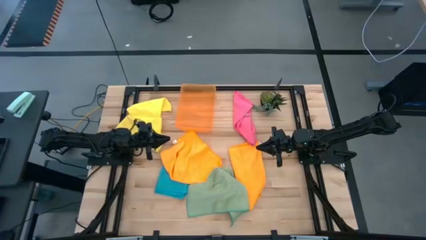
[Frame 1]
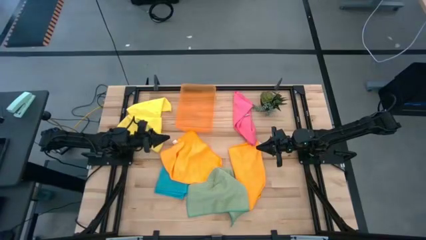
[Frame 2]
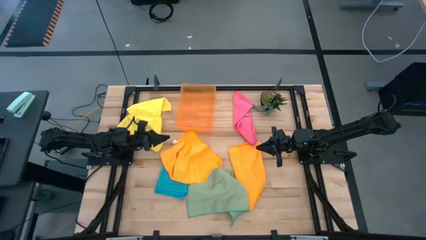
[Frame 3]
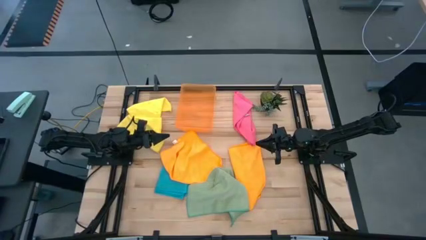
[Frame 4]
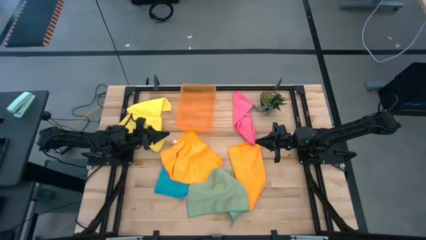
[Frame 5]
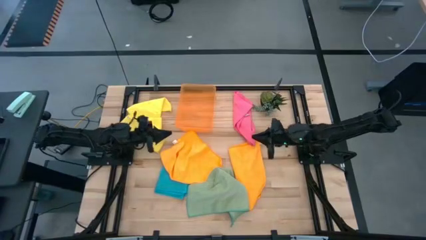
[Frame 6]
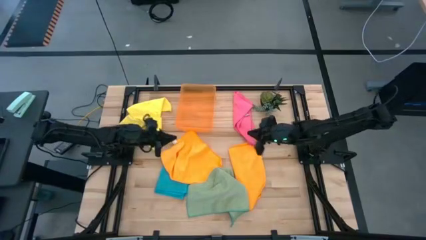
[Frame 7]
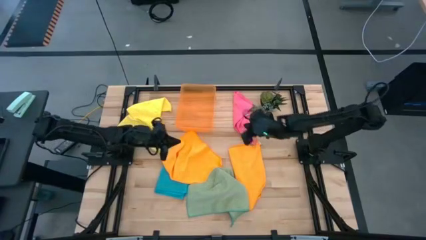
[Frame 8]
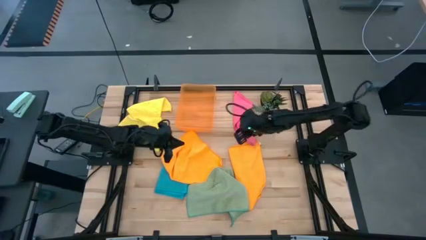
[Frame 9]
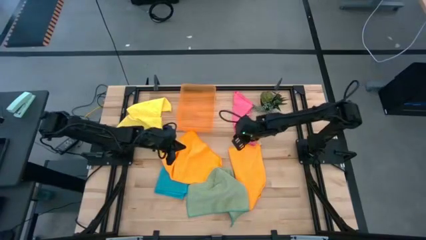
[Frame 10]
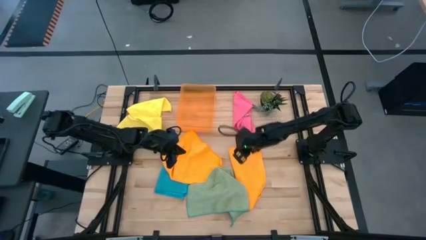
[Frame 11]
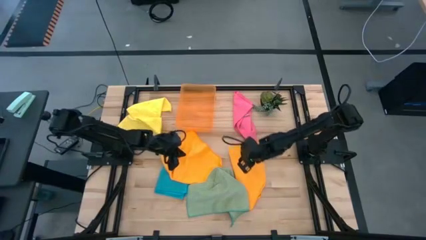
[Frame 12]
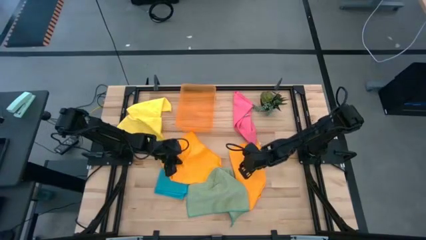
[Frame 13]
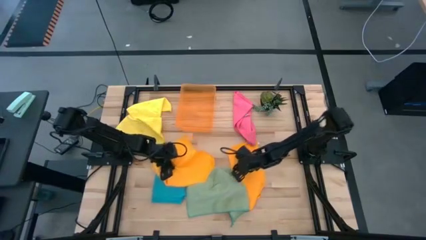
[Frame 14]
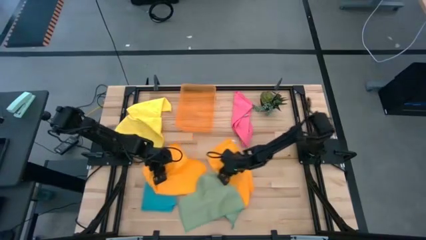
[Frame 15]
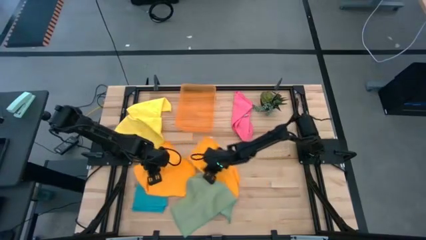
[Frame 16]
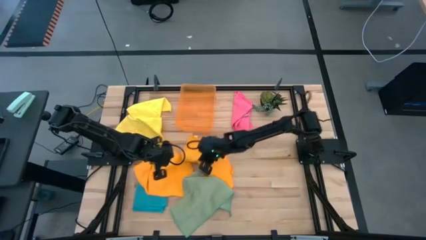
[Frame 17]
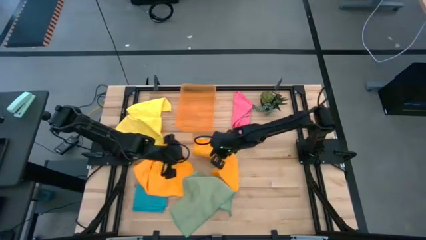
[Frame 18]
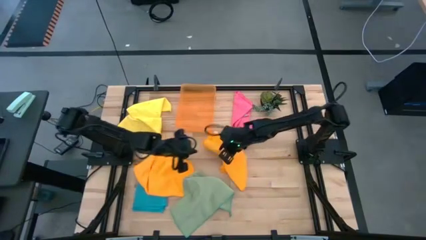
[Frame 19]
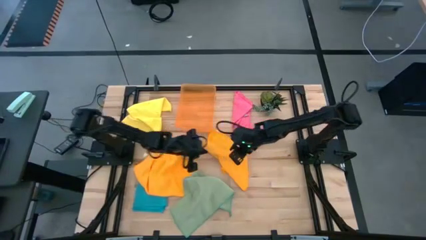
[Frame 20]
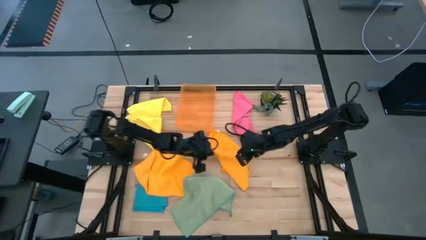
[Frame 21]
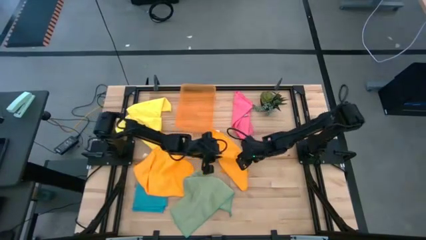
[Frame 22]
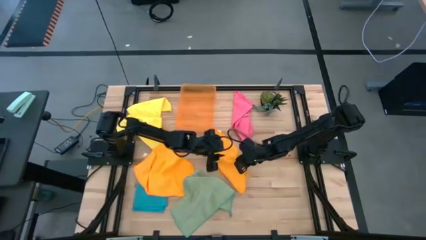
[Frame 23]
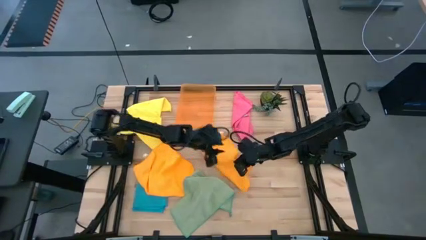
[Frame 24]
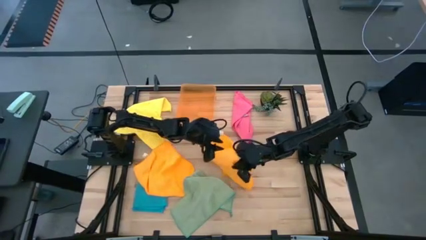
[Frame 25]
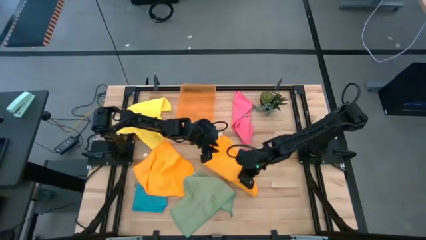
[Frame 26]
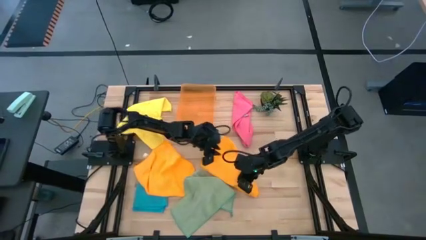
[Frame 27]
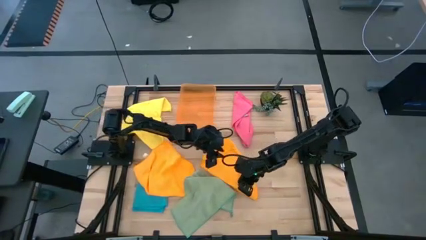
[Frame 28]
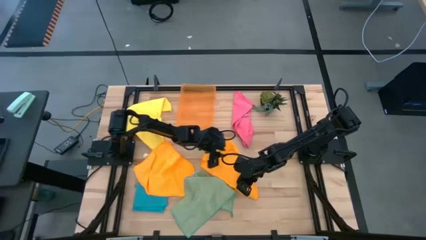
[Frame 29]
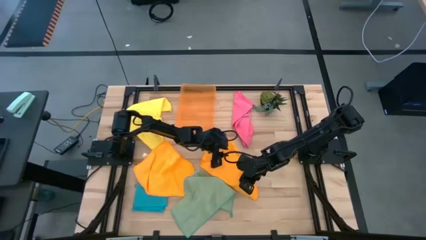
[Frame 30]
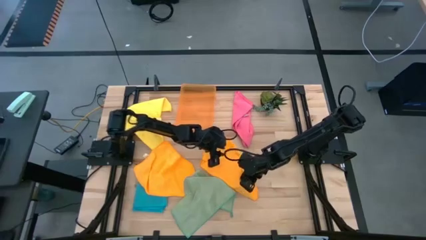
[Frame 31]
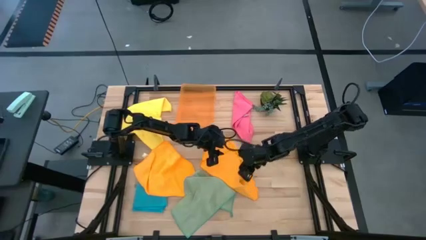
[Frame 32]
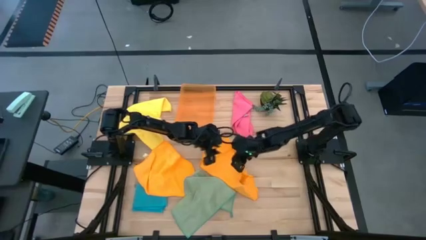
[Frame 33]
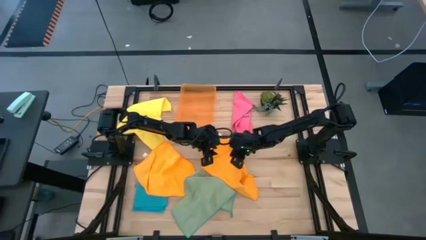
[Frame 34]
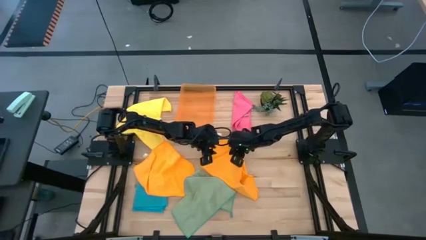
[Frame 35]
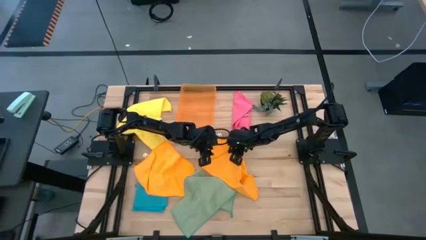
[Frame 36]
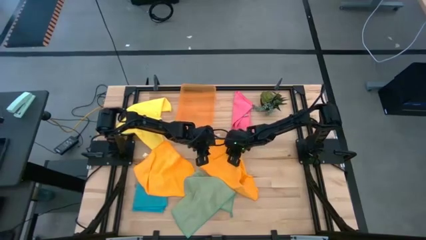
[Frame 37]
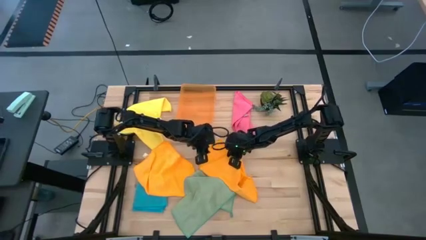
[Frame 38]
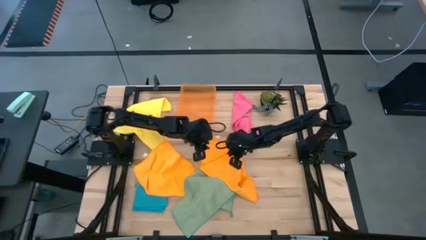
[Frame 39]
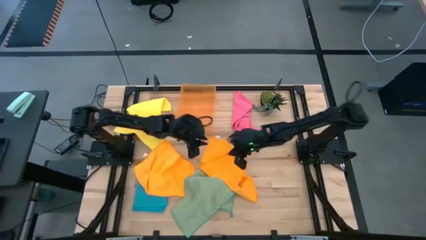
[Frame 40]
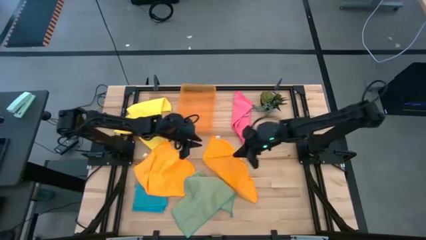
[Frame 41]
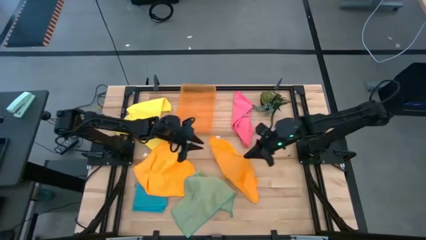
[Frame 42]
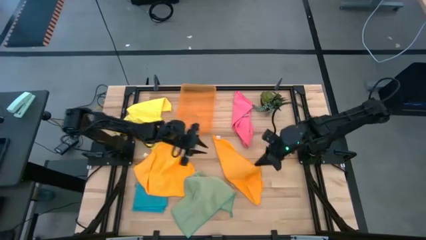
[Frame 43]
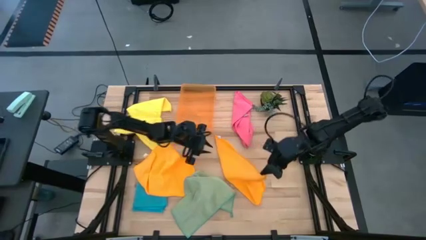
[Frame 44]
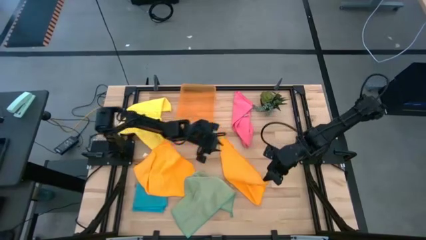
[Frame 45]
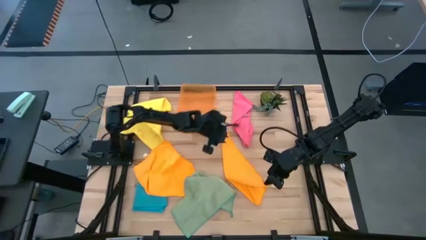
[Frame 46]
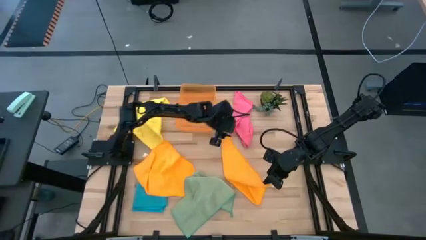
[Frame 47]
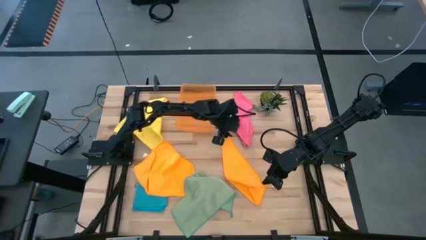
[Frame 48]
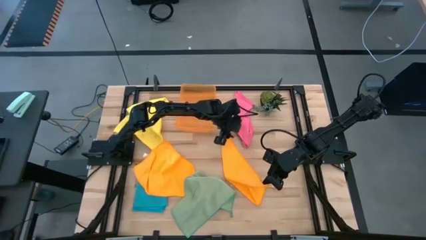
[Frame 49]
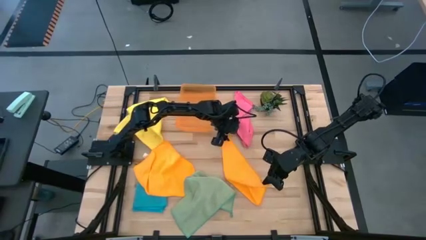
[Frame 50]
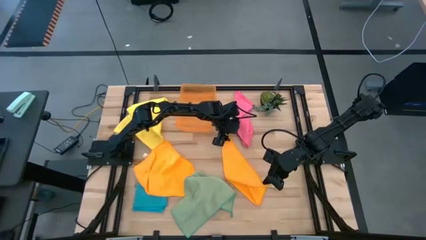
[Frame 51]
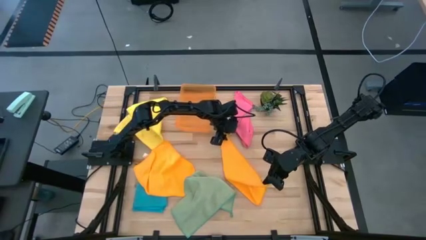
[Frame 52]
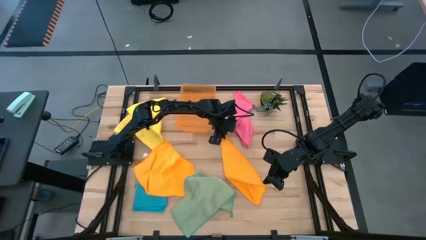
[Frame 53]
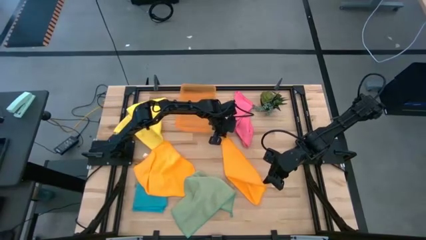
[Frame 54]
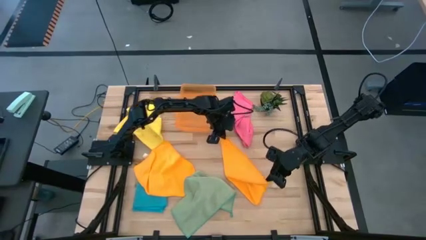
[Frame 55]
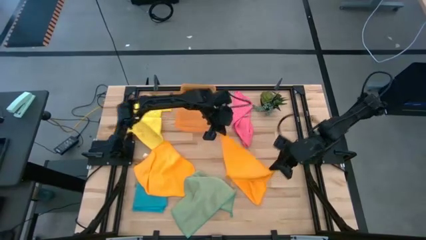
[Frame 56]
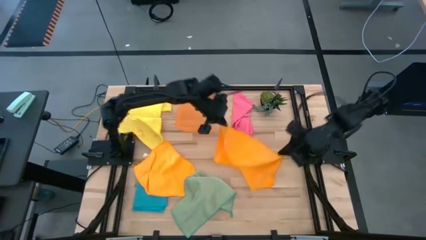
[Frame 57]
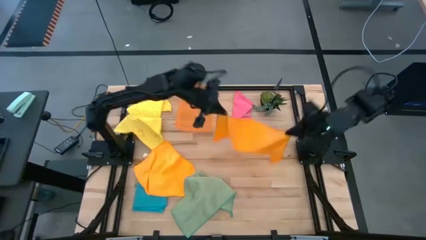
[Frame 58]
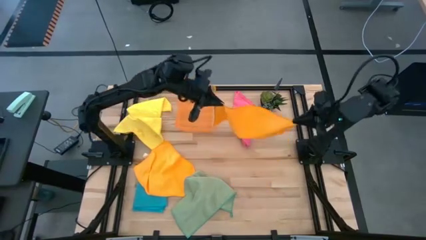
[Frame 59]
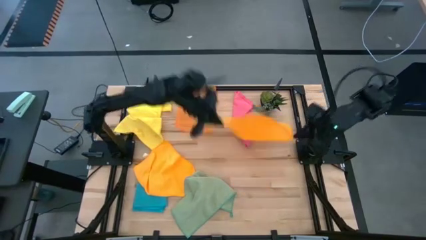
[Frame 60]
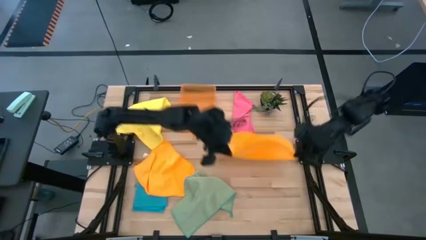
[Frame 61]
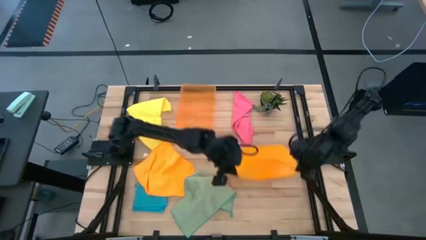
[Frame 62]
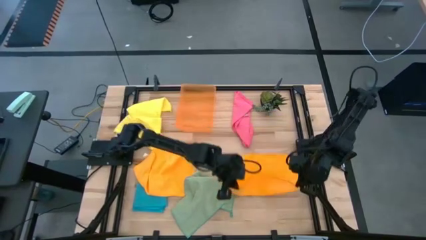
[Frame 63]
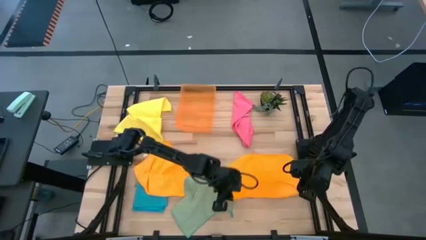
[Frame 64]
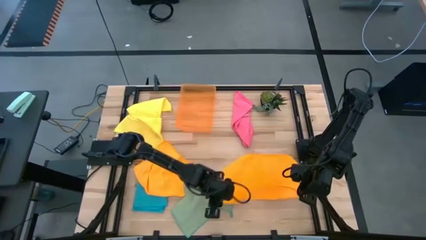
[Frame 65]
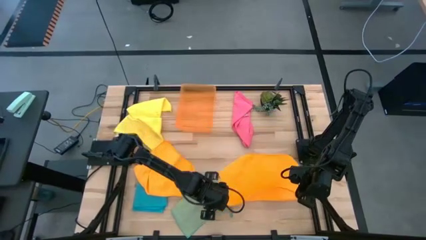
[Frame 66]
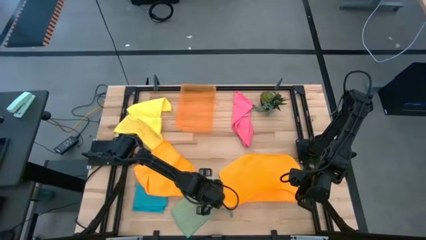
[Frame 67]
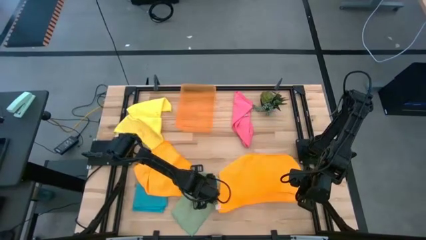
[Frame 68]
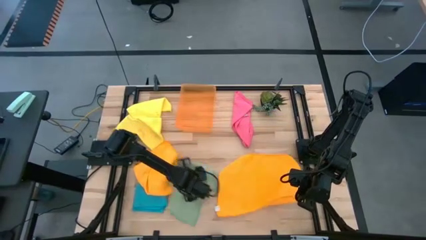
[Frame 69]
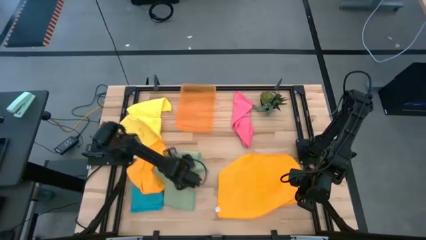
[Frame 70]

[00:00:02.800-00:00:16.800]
Task: Fold microfiber towels
Fold the right orange microfiber cloth
